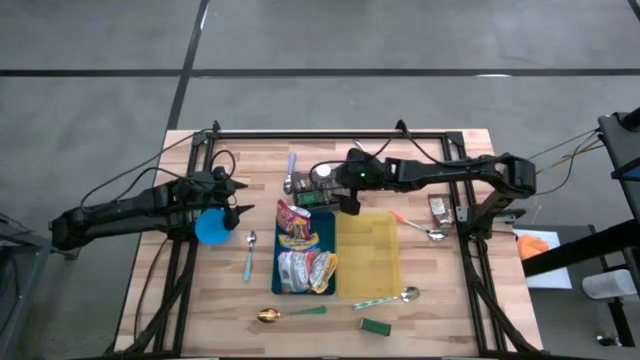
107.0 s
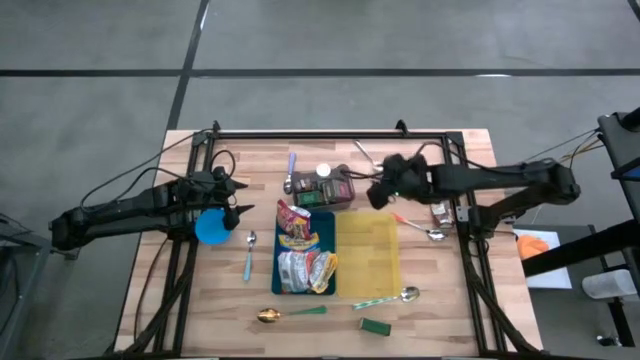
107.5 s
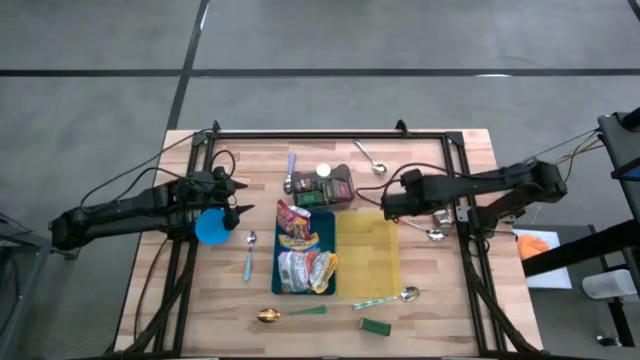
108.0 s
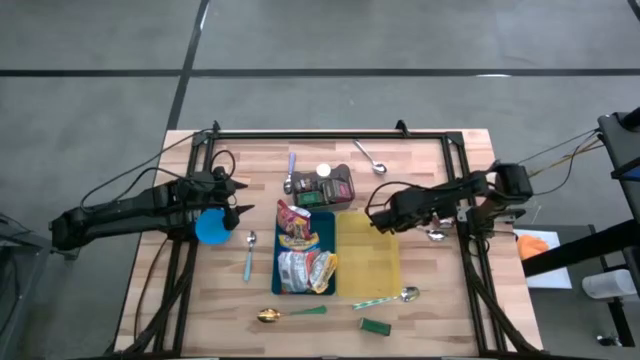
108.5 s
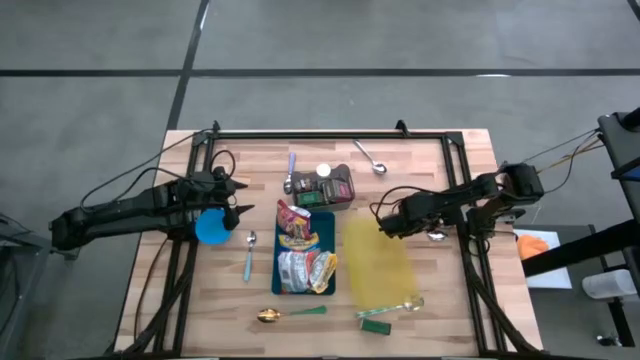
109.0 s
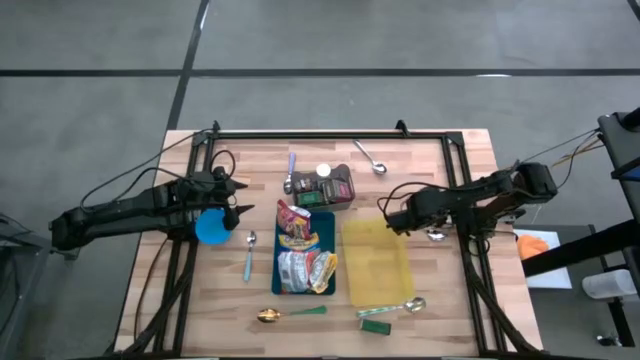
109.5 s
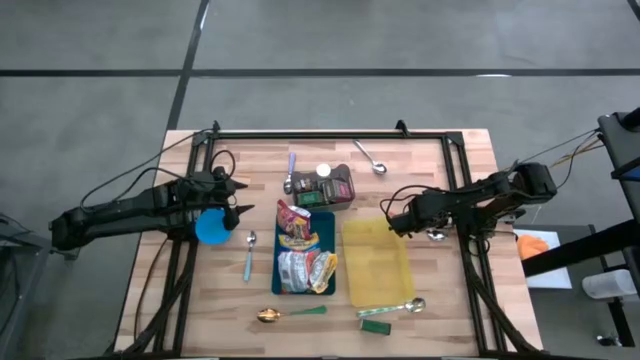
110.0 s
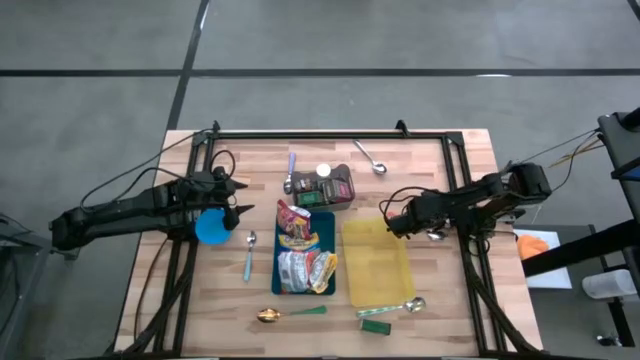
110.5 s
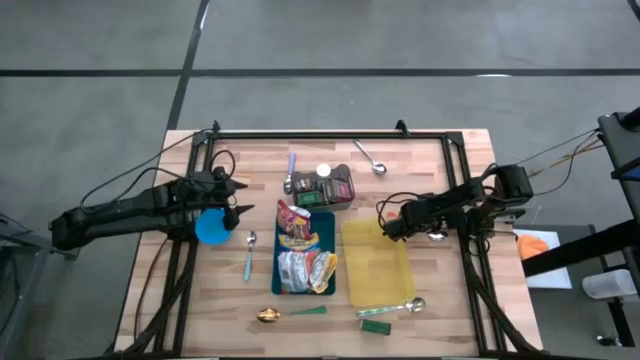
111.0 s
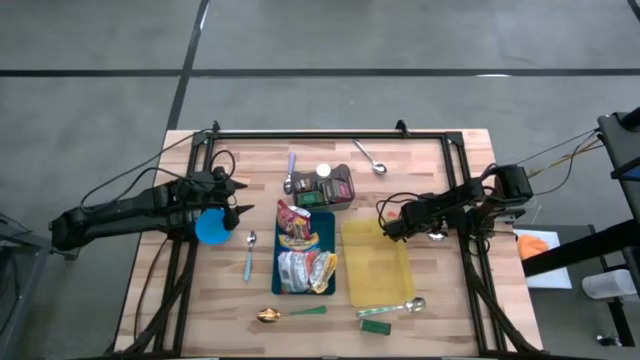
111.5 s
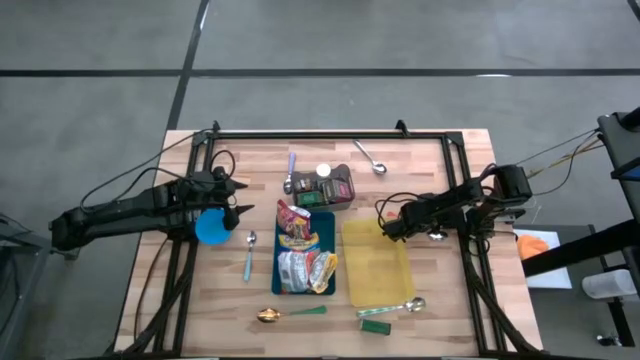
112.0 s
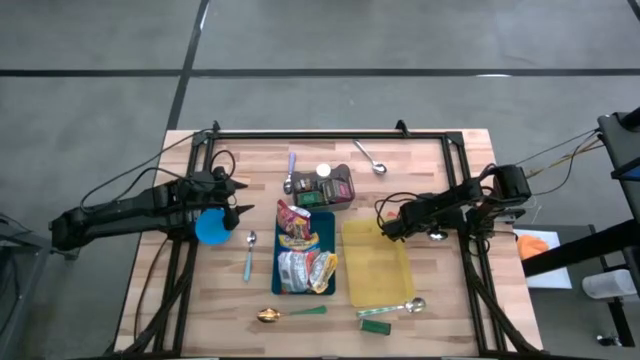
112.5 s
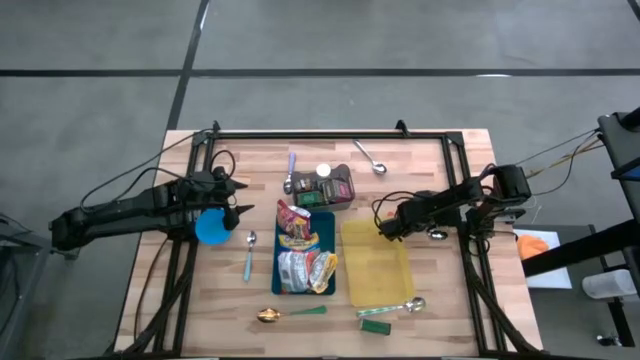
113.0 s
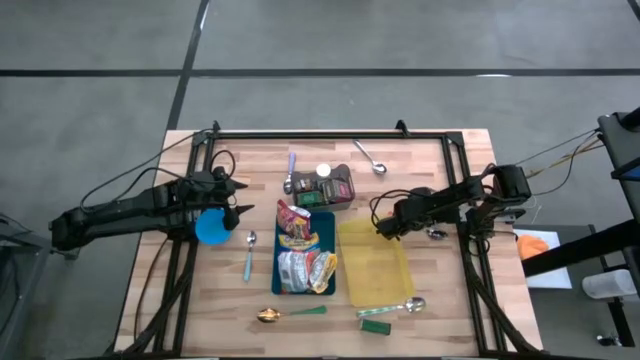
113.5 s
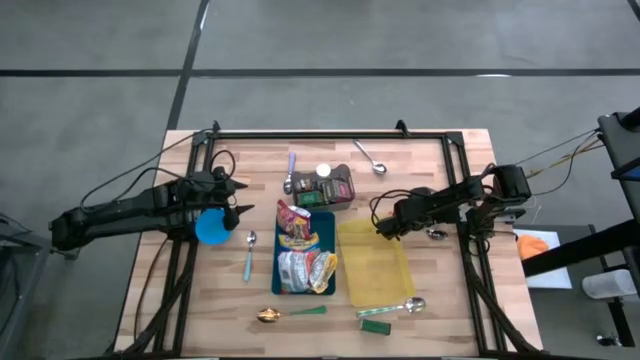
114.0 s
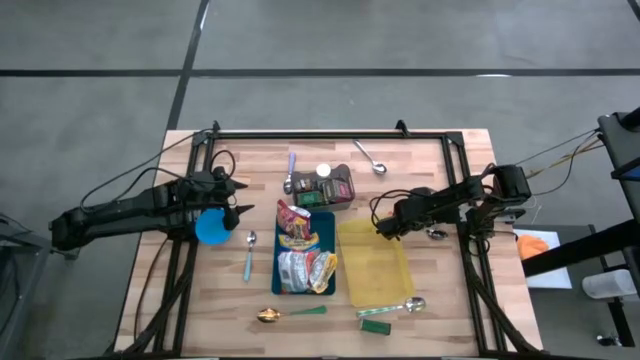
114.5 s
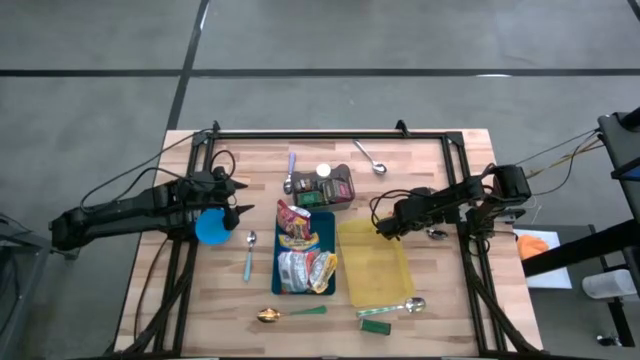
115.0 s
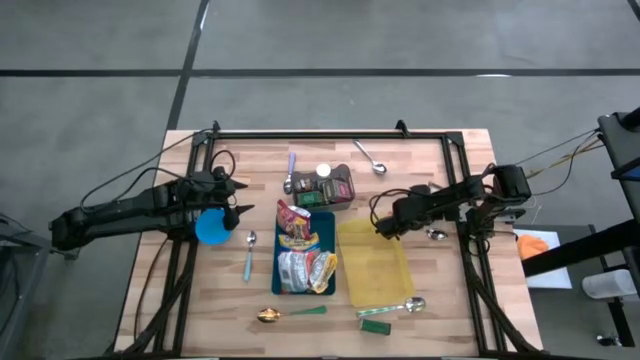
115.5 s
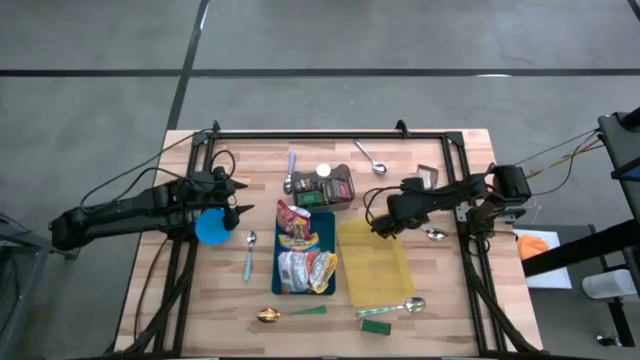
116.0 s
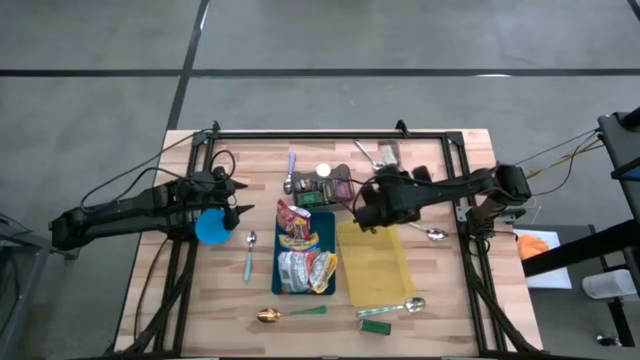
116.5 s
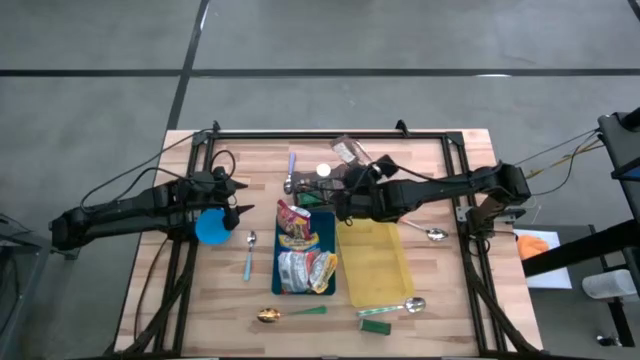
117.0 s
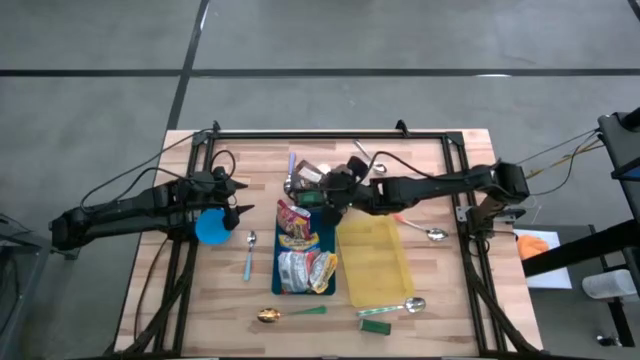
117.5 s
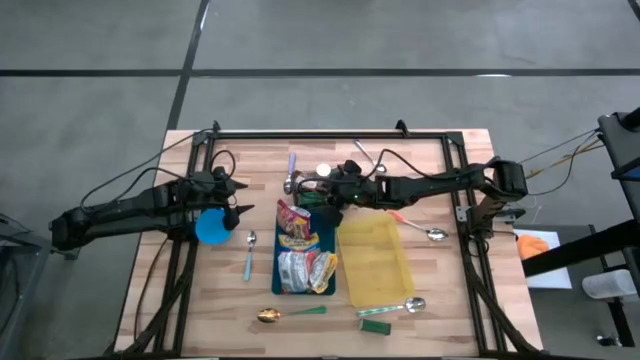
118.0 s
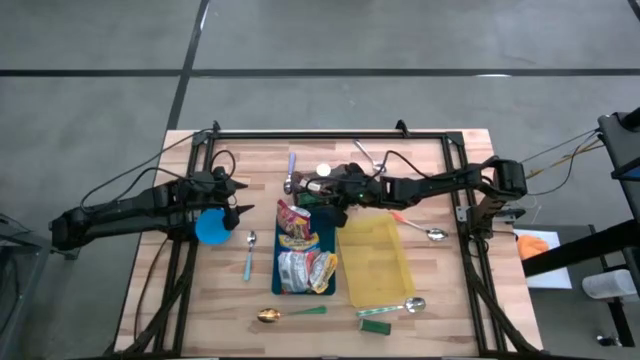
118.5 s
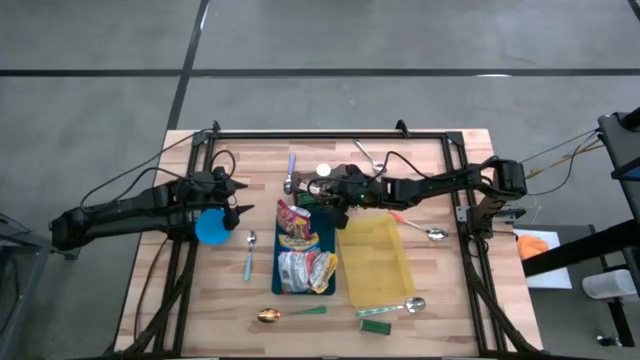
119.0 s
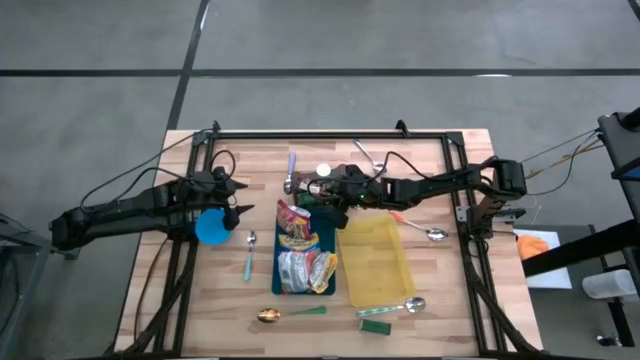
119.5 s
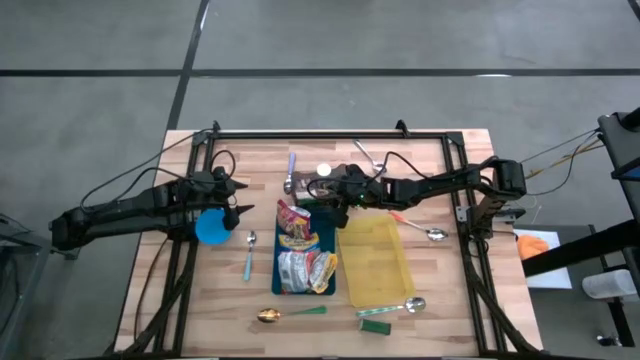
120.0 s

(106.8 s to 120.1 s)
Put the orange spice bag into the black bin
